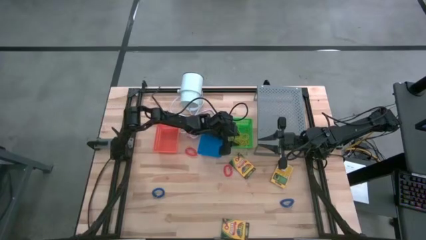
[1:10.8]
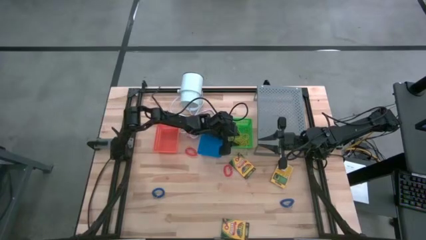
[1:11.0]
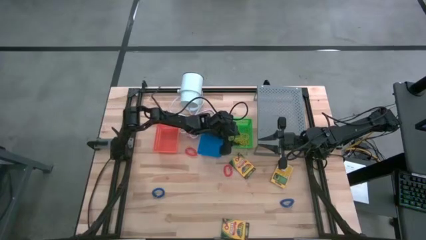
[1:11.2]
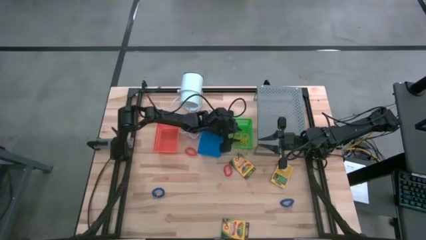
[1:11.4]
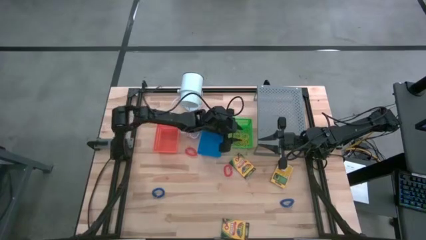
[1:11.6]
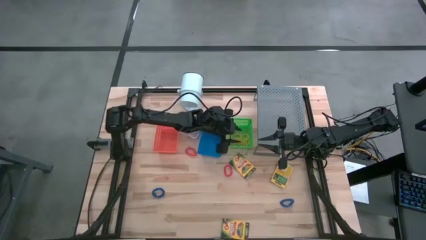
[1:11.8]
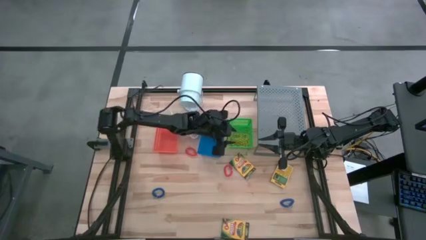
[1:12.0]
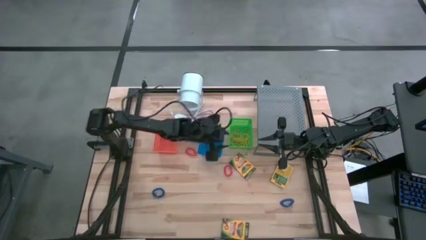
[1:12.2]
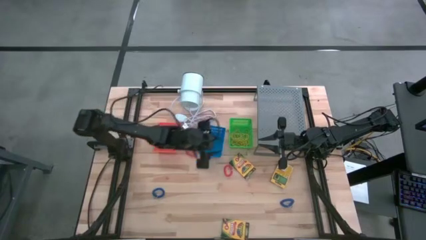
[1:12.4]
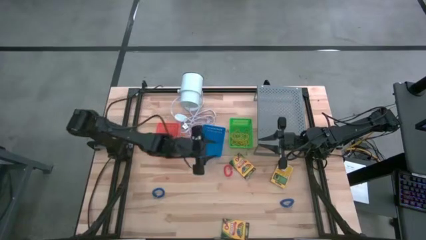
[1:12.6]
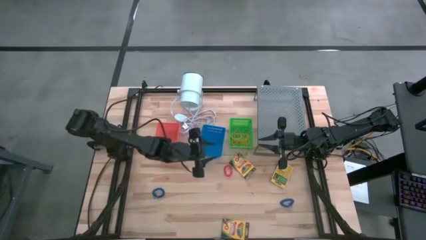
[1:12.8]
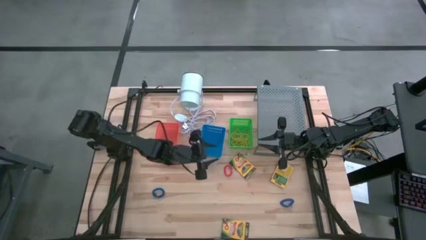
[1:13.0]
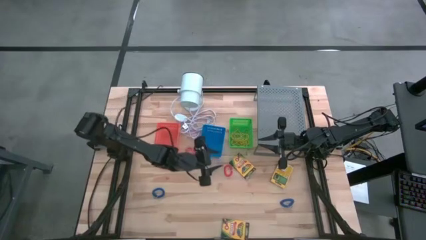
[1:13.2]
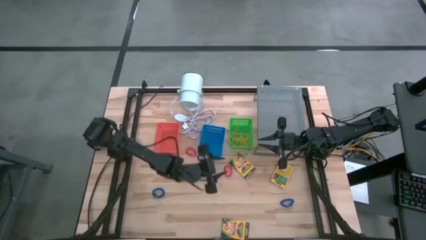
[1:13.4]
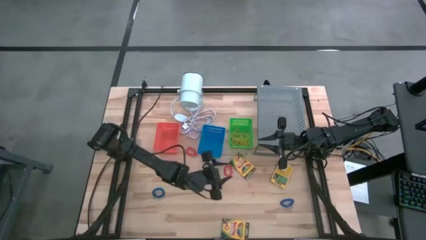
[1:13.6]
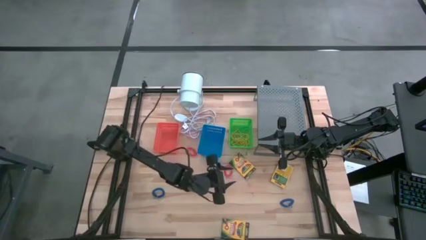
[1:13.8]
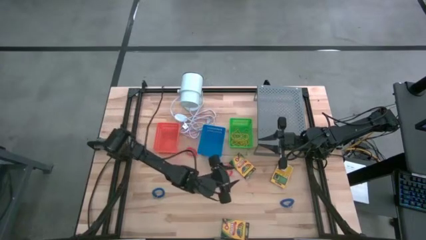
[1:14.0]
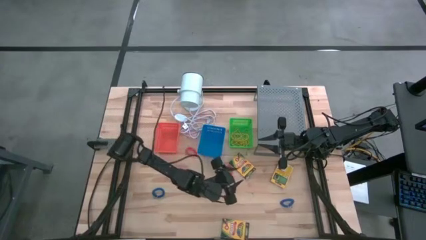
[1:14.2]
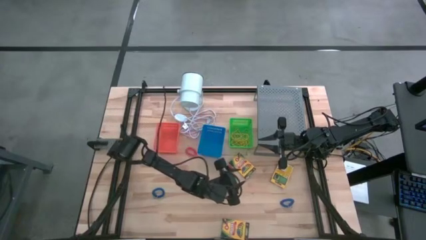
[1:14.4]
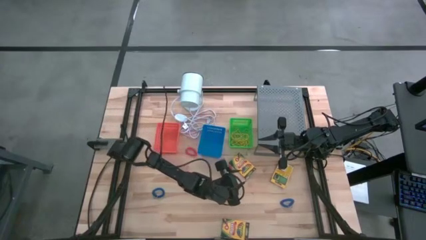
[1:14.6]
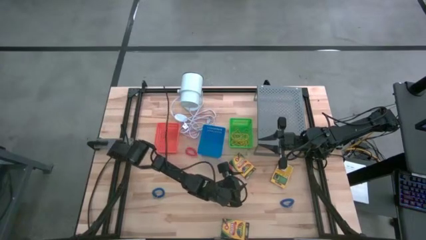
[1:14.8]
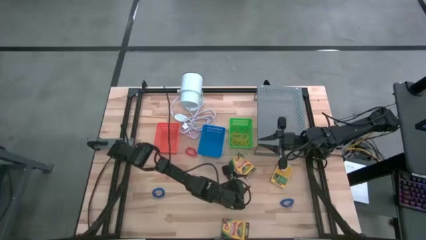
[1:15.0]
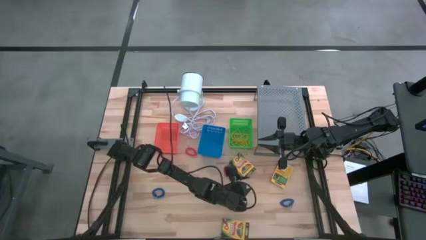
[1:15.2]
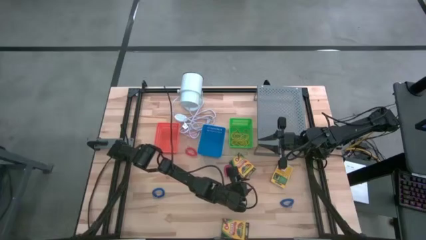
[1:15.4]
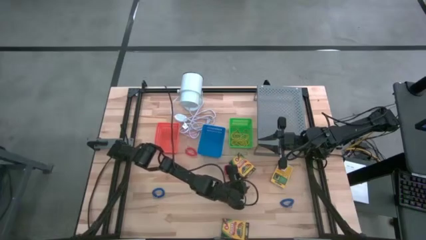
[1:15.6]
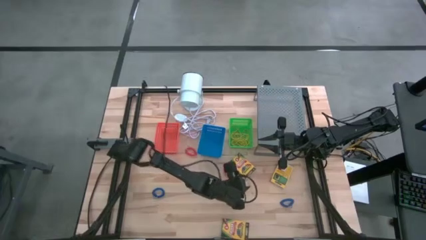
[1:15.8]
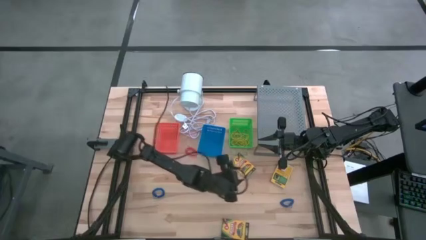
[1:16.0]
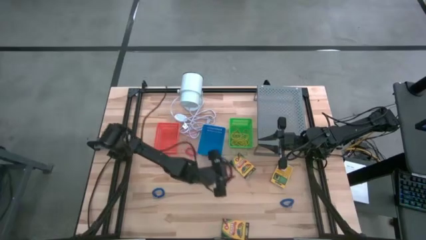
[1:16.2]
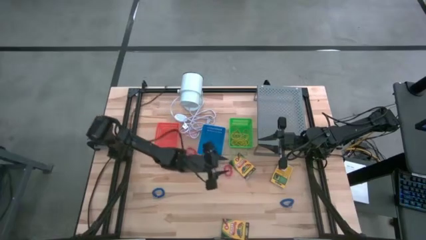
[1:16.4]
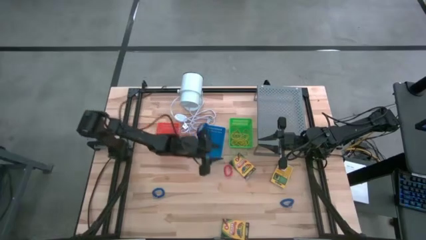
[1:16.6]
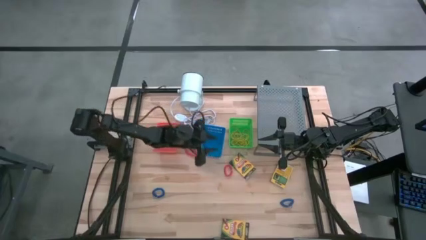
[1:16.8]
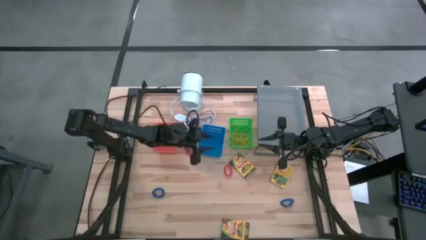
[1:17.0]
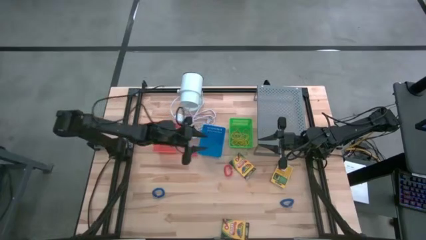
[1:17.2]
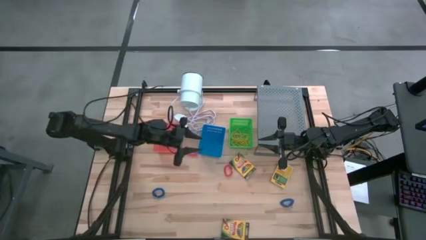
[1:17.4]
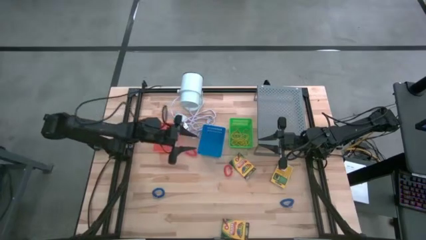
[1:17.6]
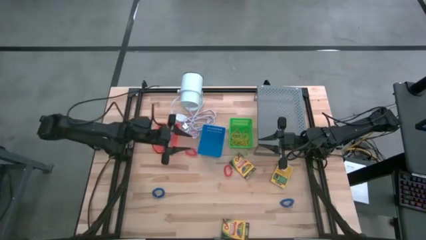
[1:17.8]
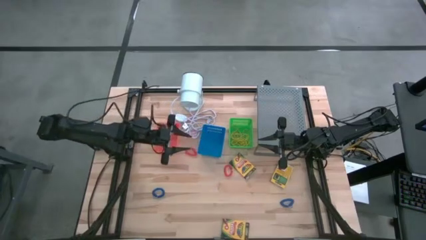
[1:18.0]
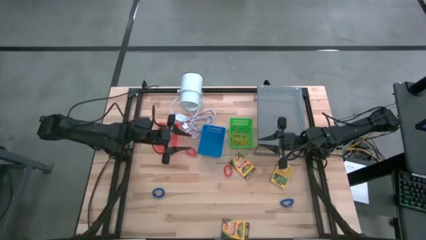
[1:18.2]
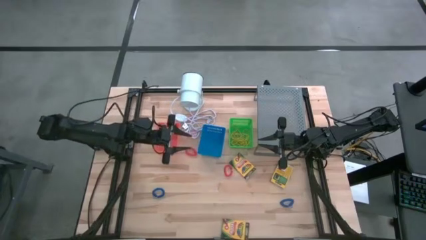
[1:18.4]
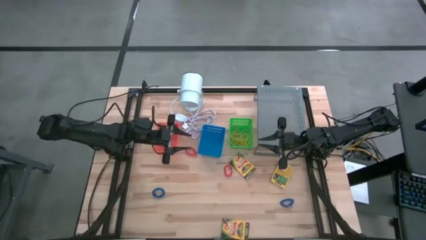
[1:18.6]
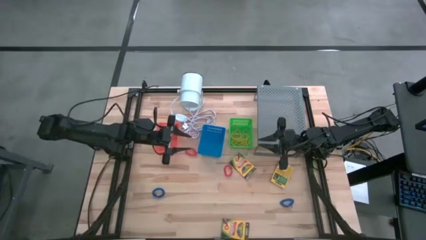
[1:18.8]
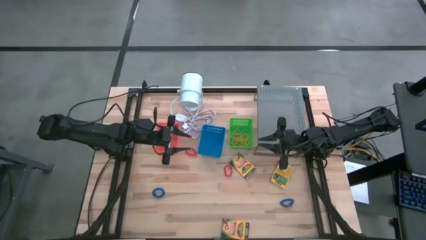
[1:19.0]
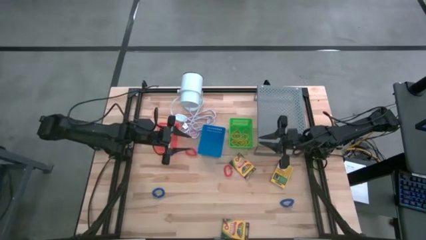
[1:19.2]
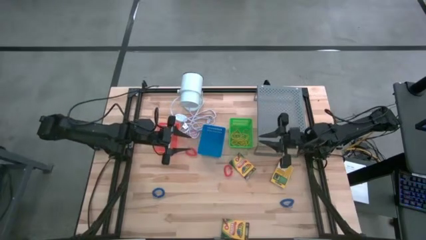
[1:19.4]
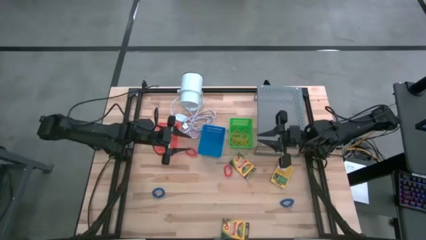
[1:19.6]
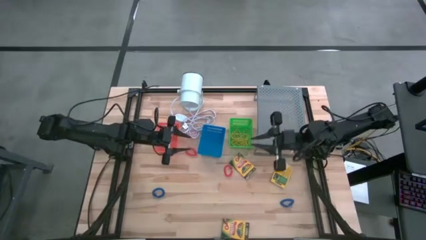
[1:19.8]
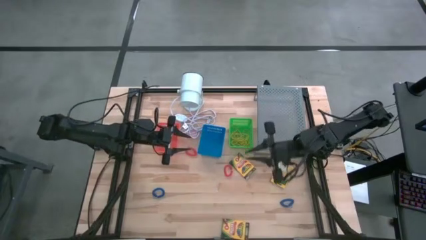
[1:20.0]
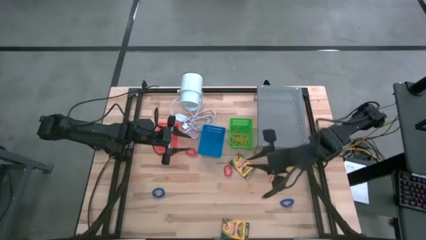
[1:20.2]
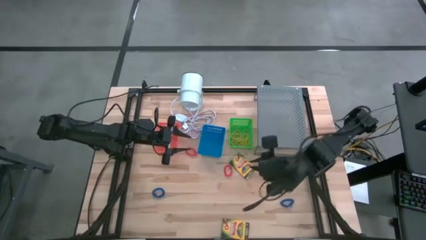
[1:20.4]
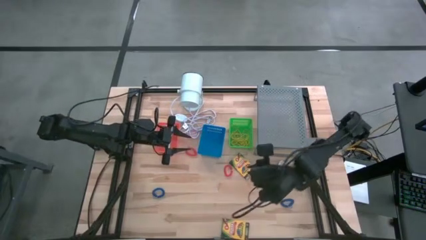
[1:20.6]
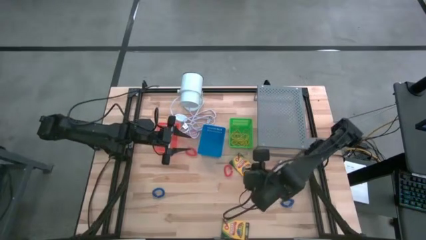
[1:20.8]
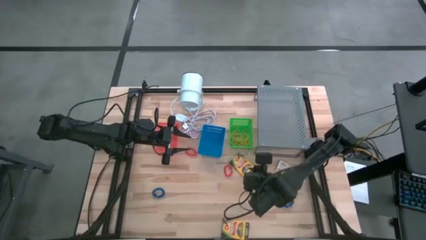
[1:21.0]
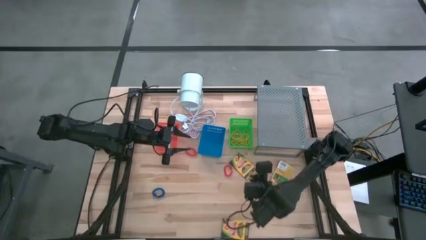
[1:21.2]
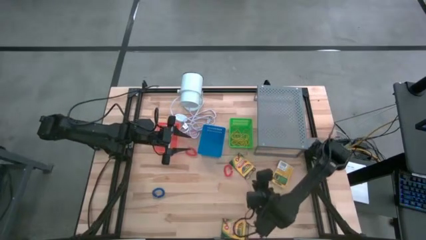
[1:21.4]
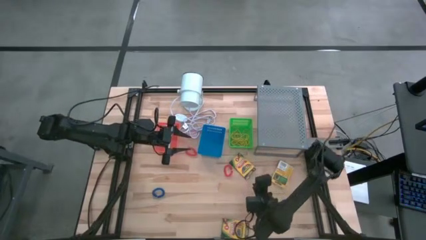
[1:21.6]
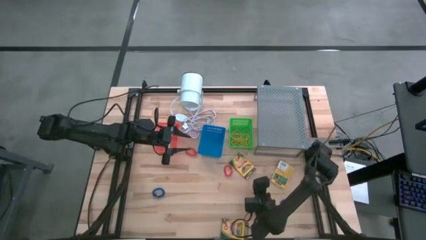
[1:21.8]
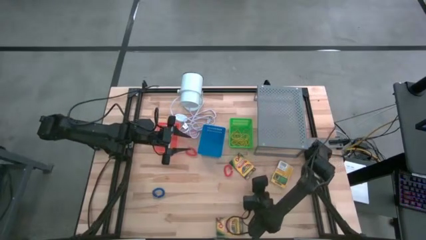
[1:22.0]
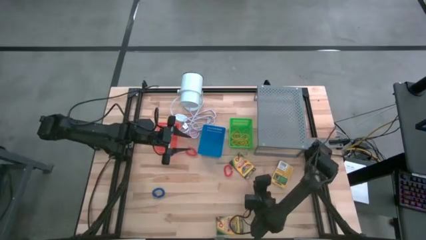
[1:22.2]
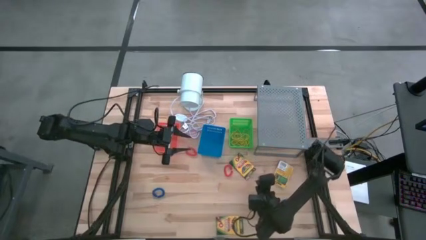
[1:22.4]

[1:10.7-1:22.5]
Task: Pick & Place Office Desk Supplies
Put the pack of crayon into the blue bin
